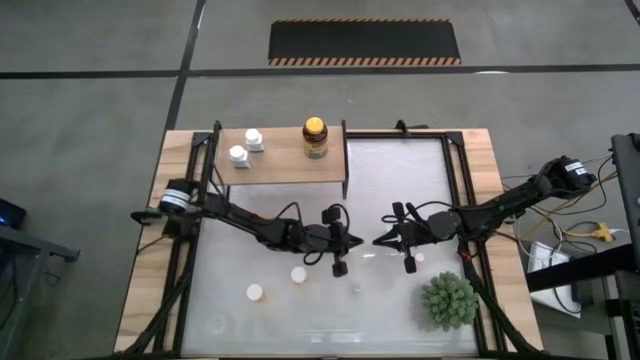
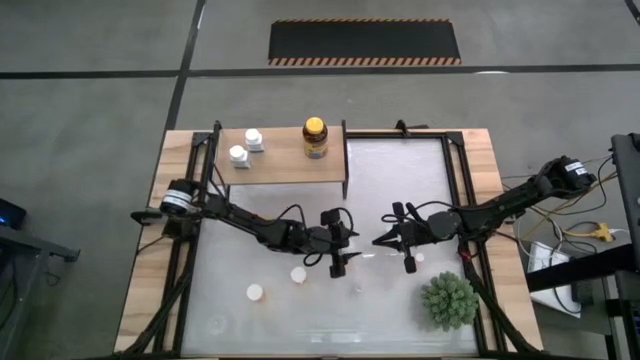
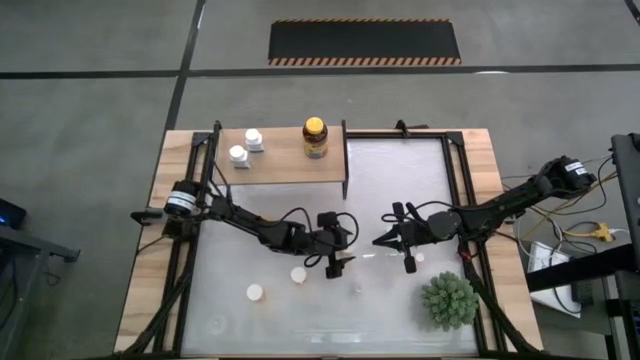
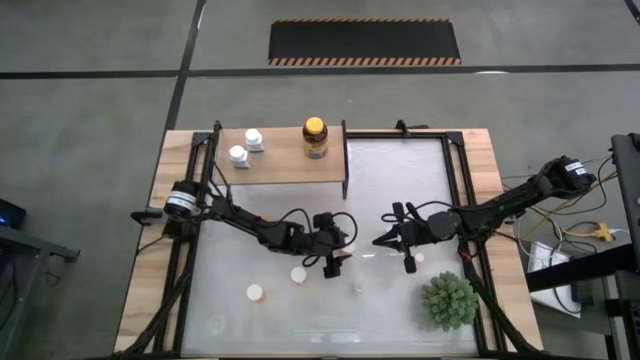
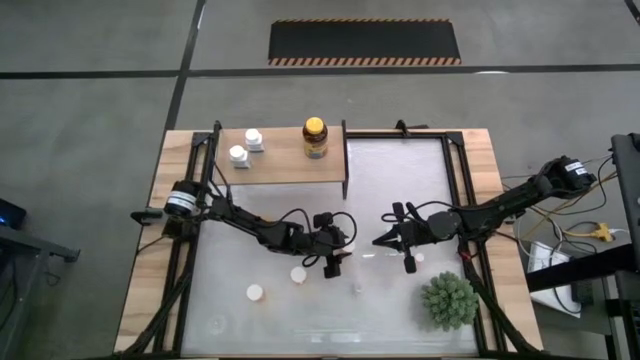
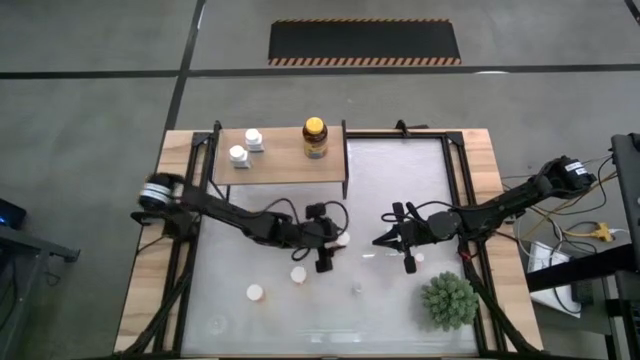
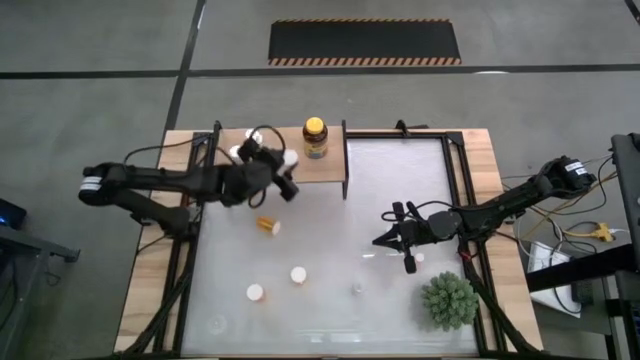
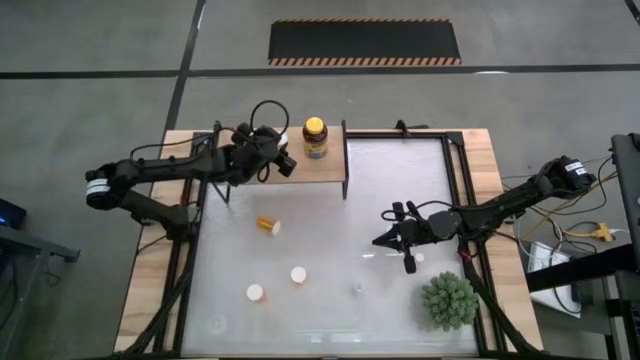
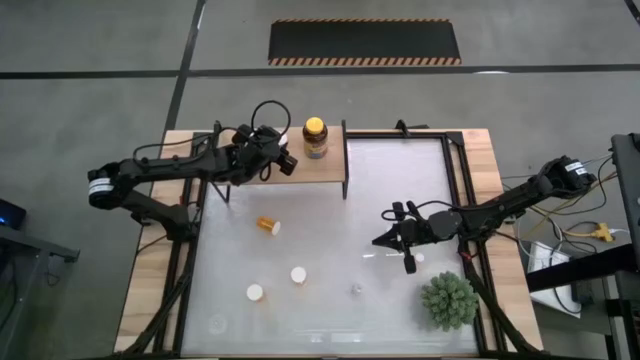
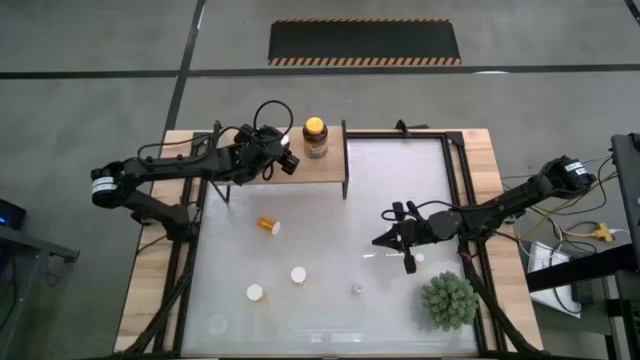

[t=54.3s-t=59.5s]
Task: Pick and place medicine bottles onto shelf by color
Put the orange pill bottle on the shelf

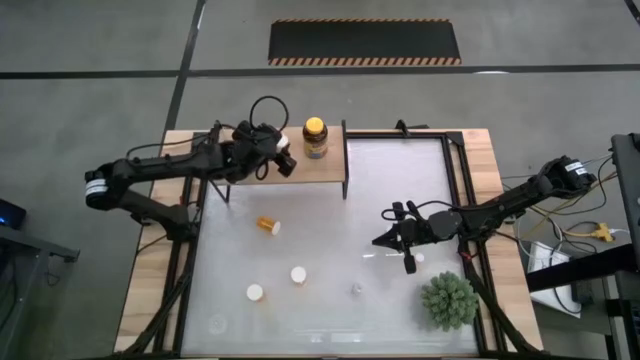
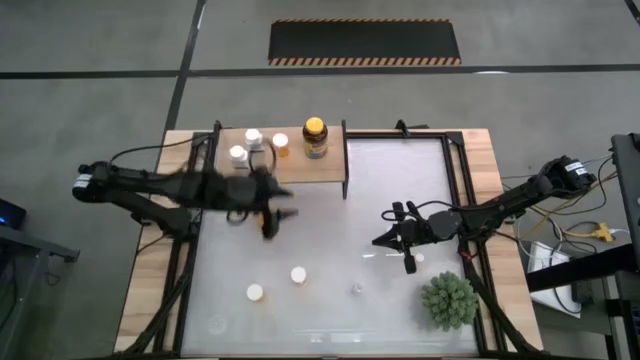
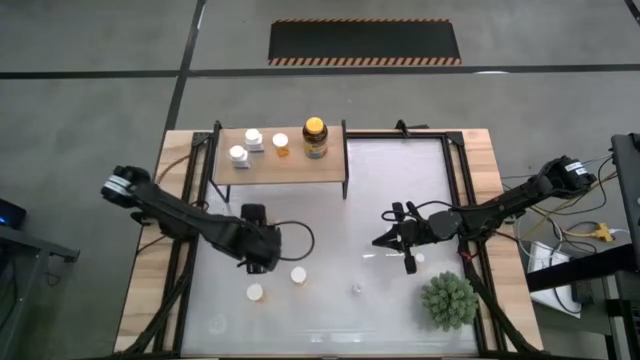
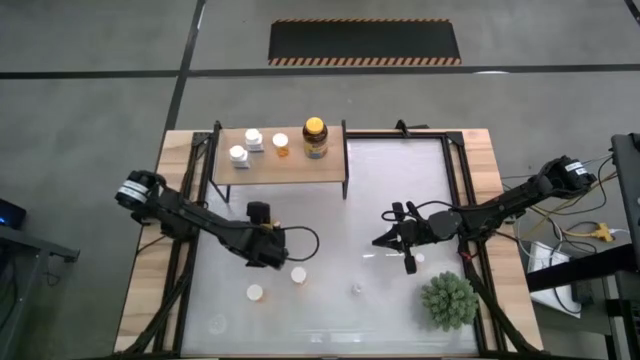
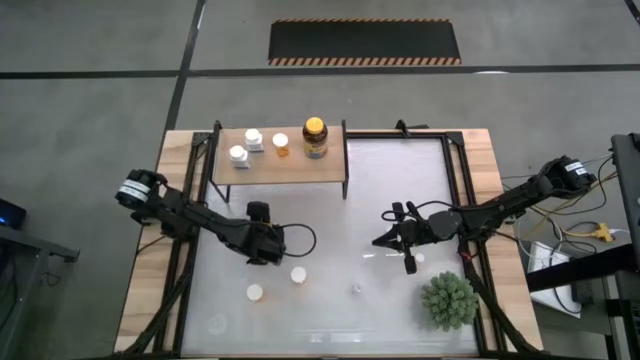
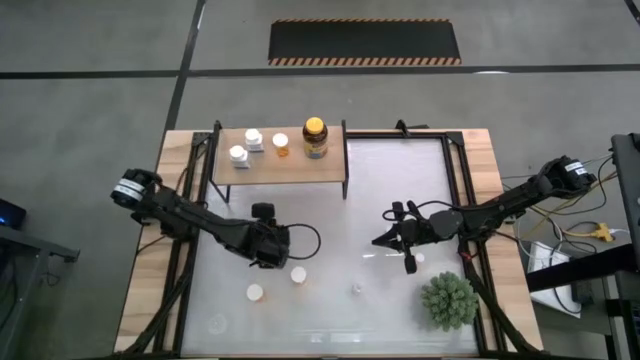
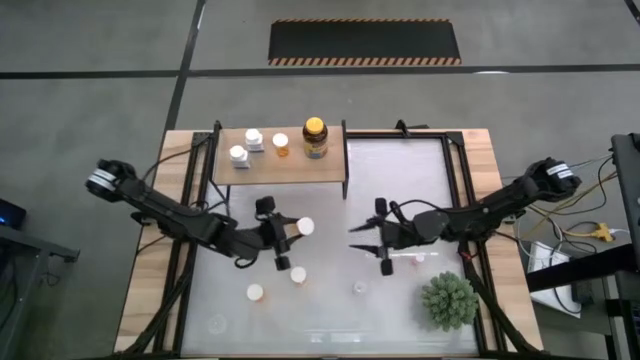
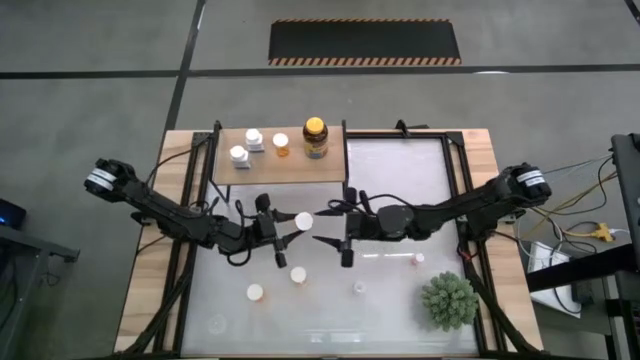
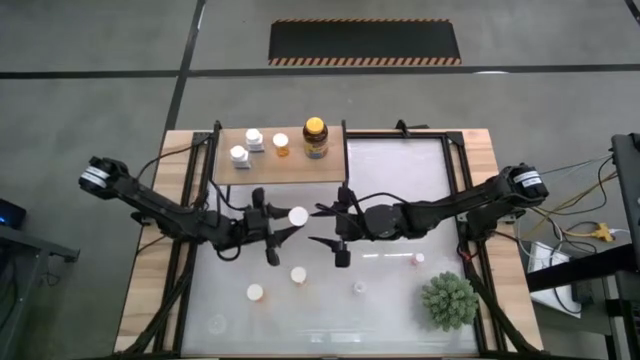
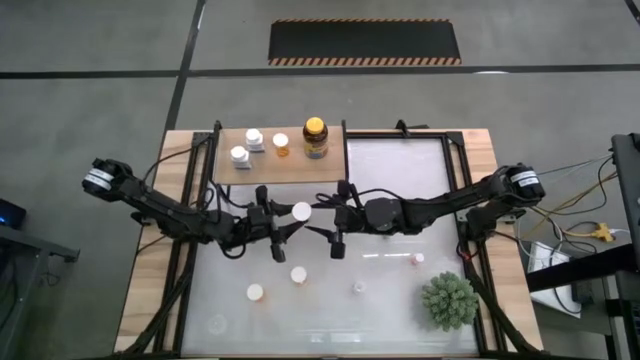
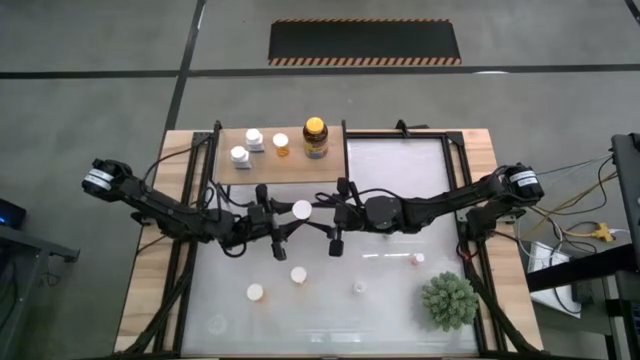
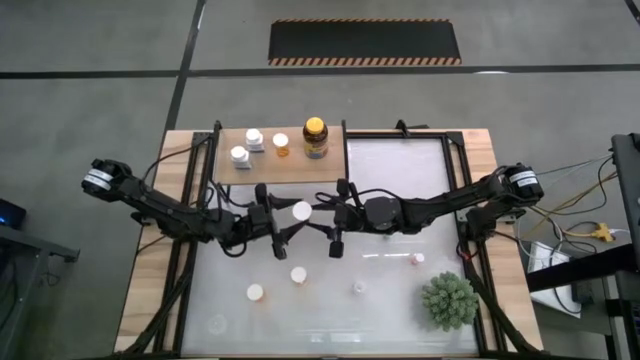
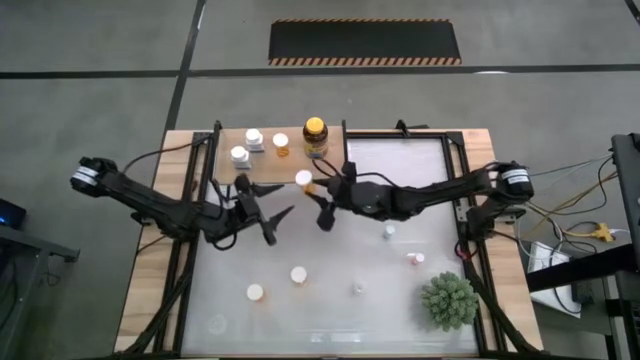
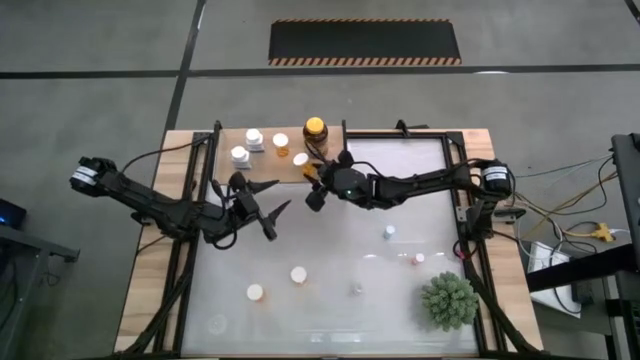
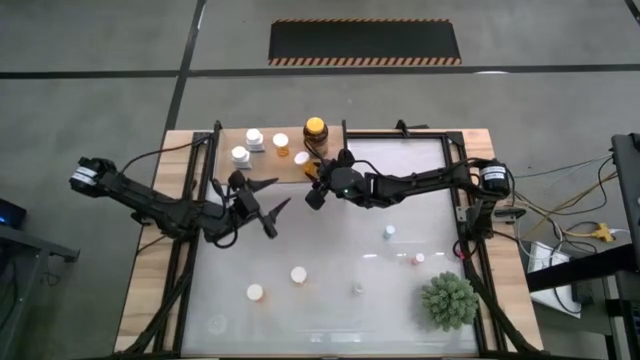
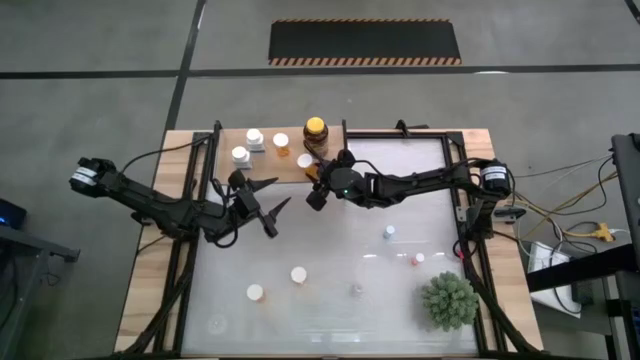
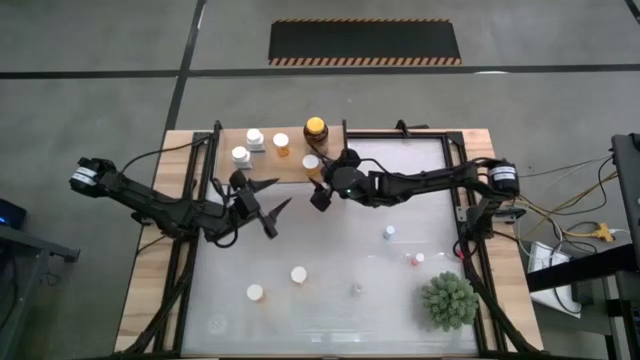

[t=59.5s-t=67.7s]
Put the orange pill bottle on the shelf

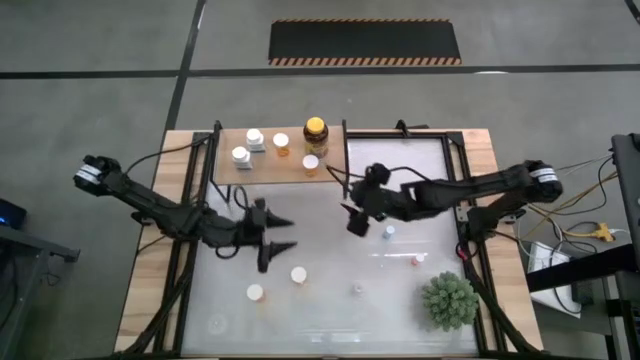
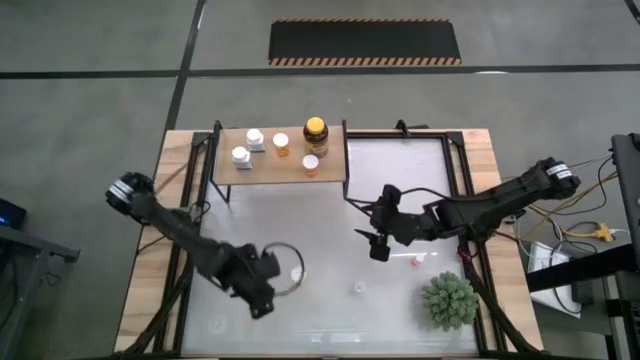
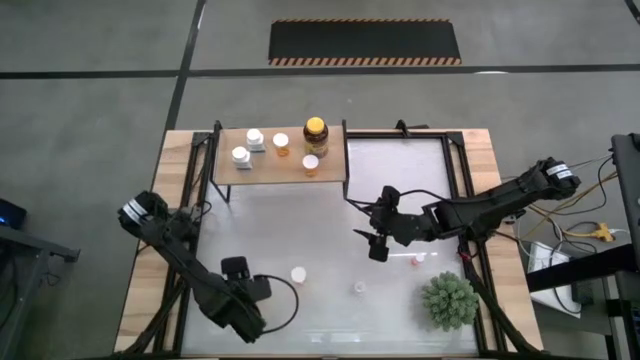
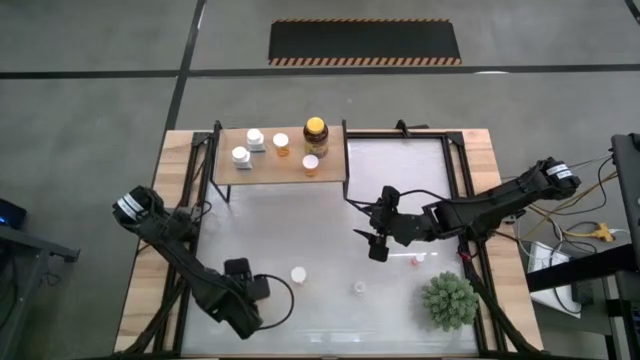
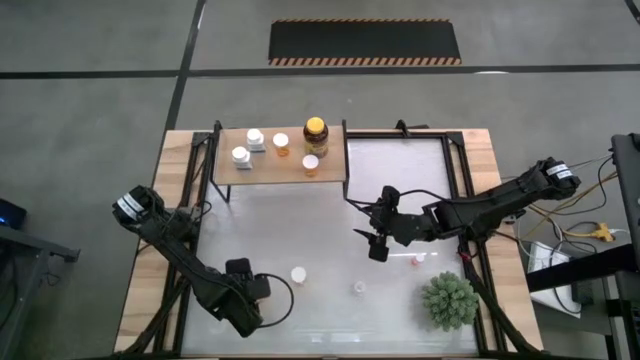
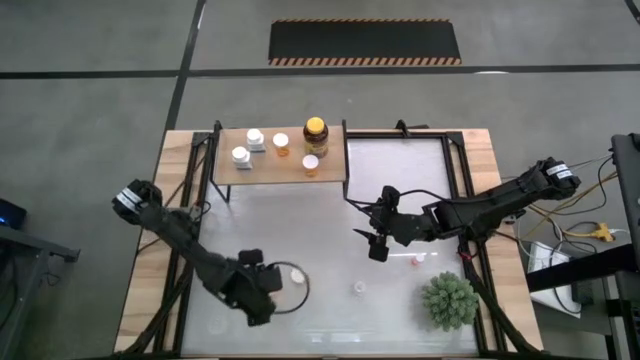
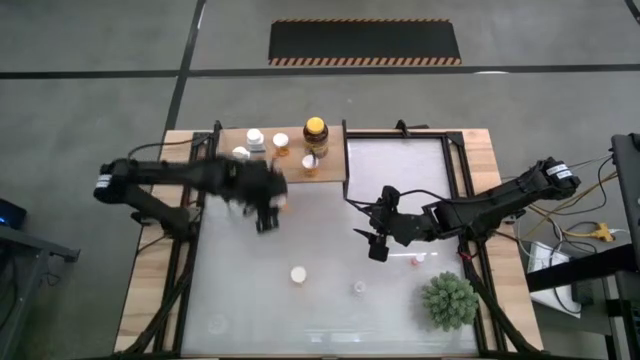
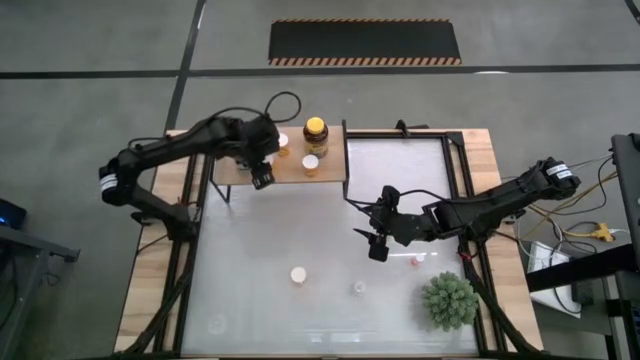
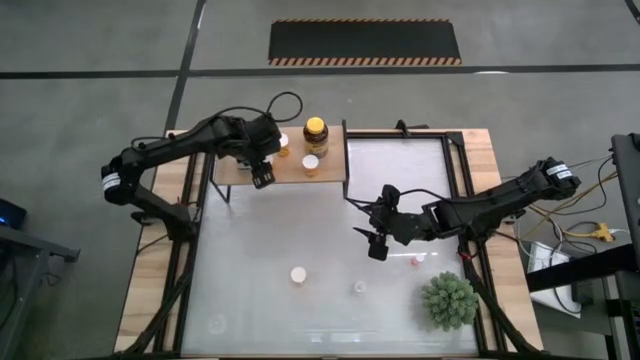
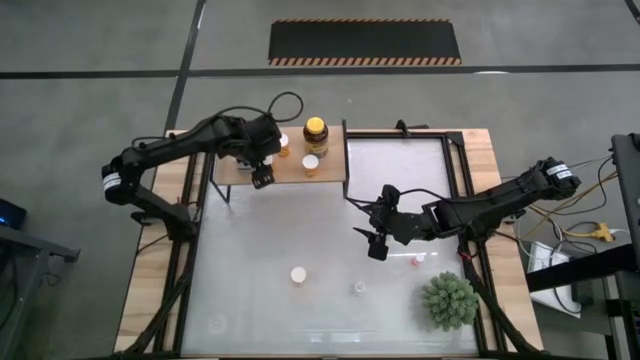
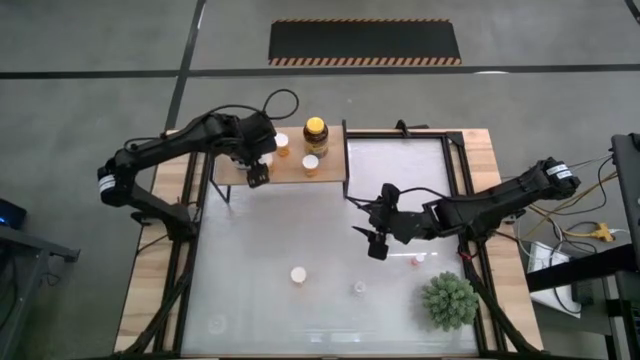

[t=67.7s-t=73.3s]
Put the orange pill bottle on the shelf

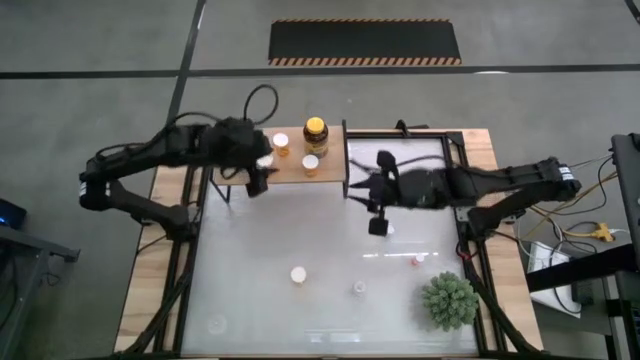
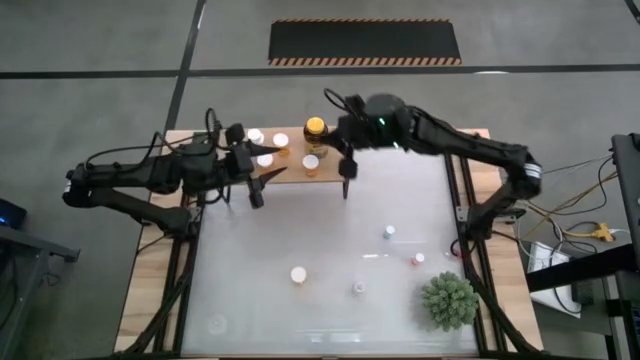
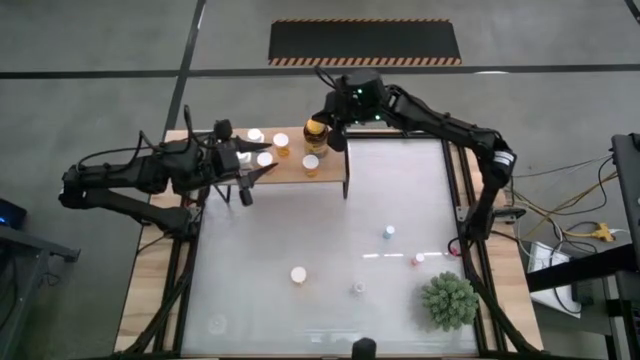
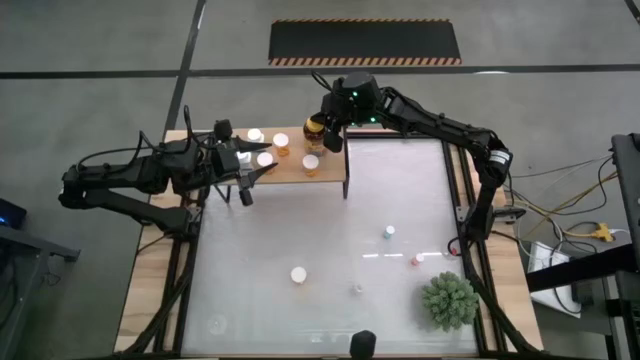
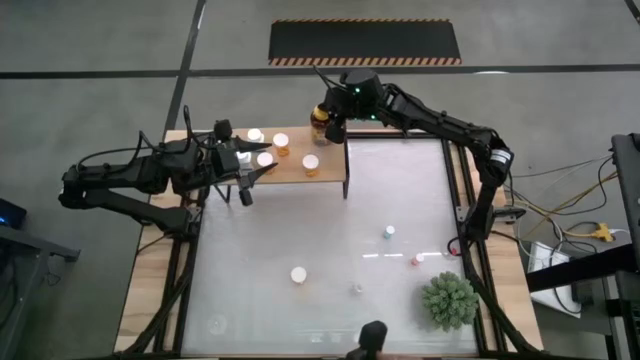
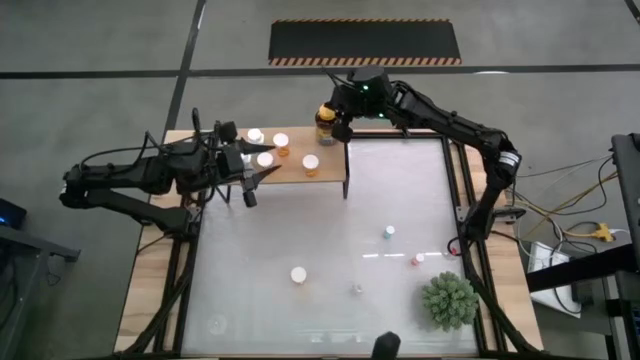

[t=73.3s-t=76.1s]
Adjust the lid of the yellow medicine bottle
